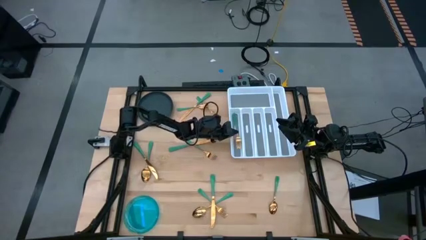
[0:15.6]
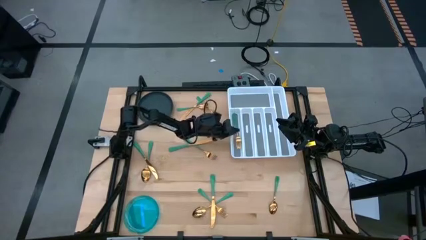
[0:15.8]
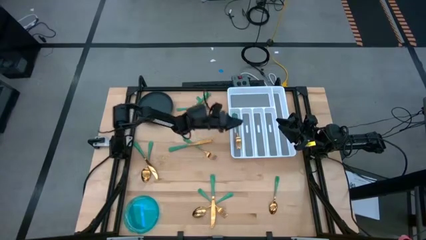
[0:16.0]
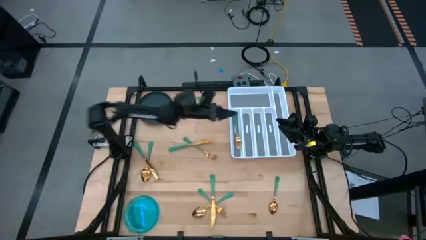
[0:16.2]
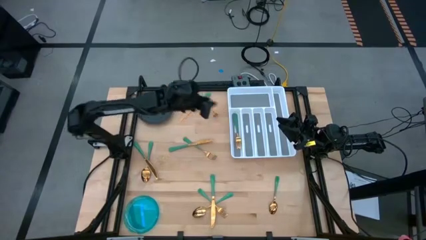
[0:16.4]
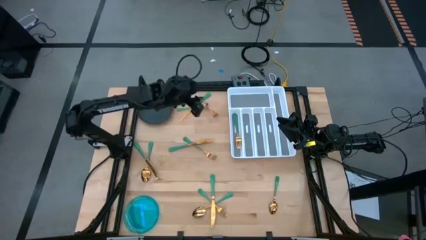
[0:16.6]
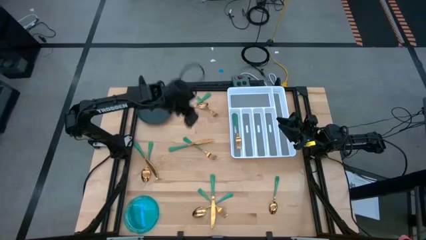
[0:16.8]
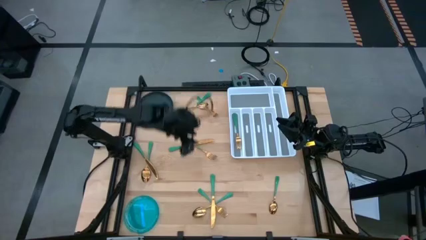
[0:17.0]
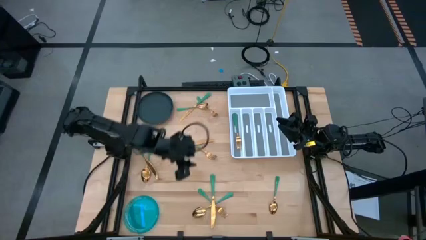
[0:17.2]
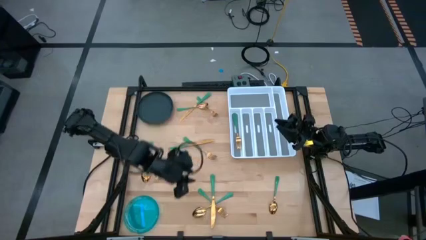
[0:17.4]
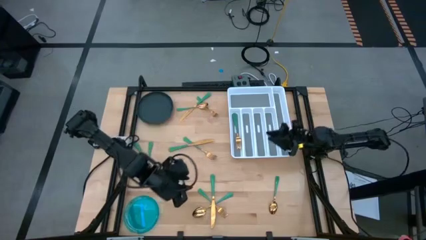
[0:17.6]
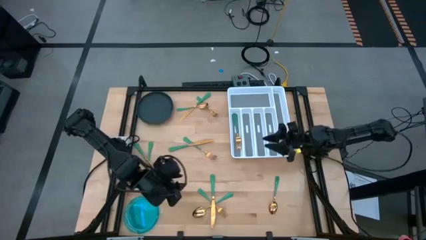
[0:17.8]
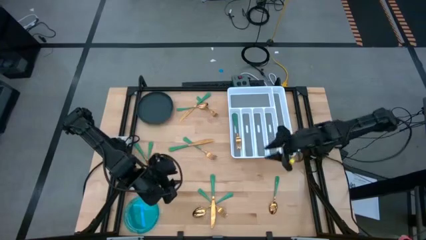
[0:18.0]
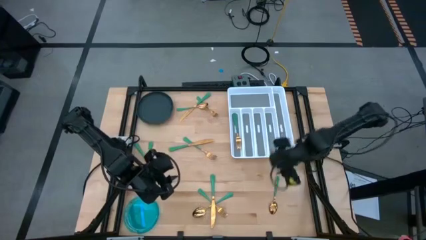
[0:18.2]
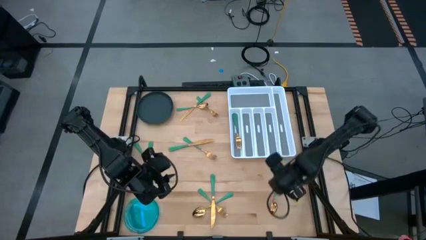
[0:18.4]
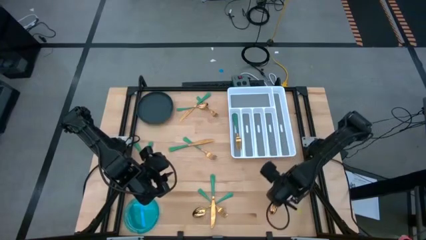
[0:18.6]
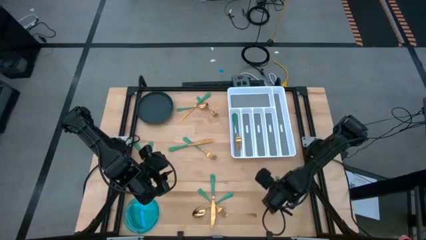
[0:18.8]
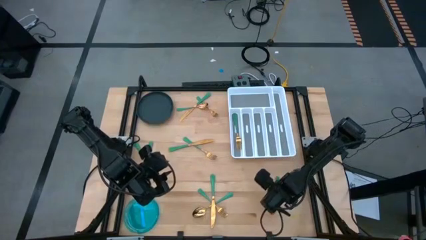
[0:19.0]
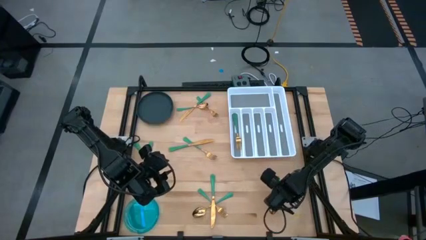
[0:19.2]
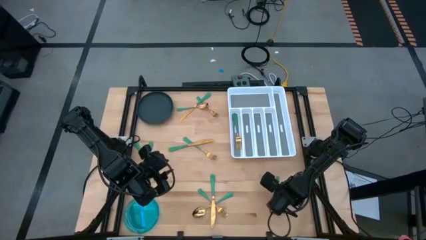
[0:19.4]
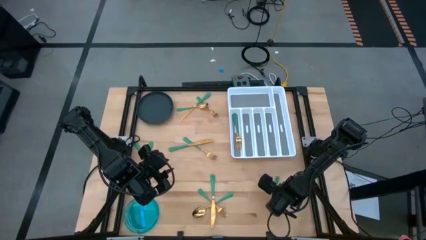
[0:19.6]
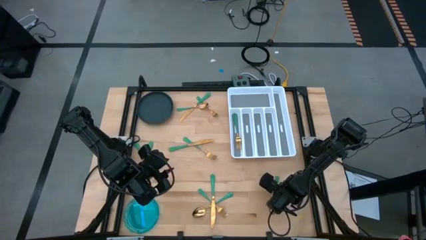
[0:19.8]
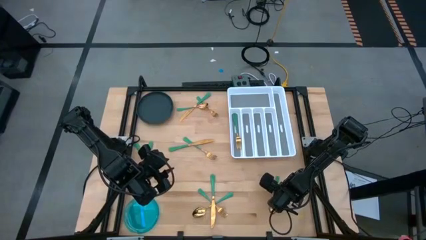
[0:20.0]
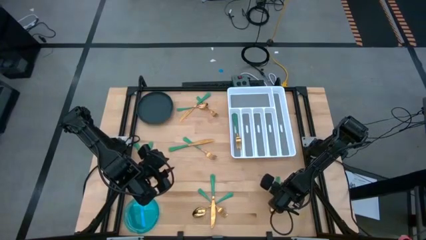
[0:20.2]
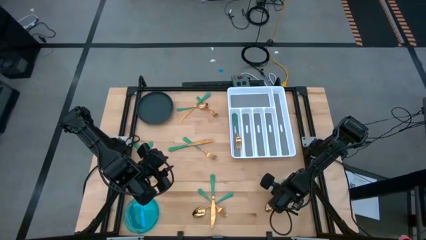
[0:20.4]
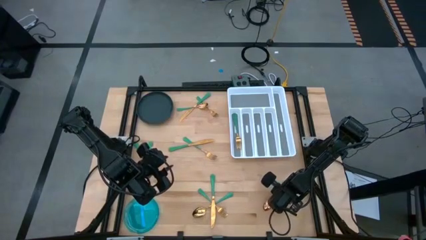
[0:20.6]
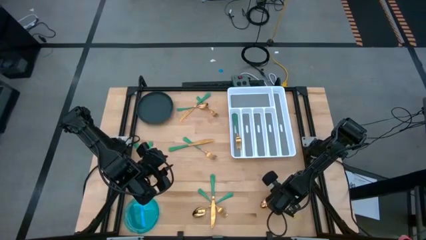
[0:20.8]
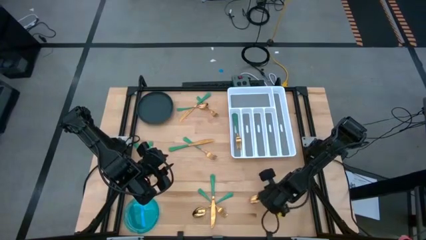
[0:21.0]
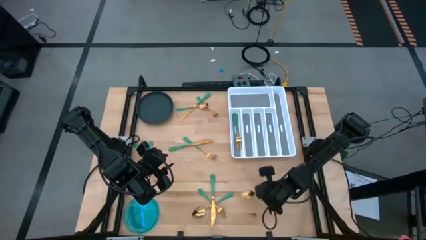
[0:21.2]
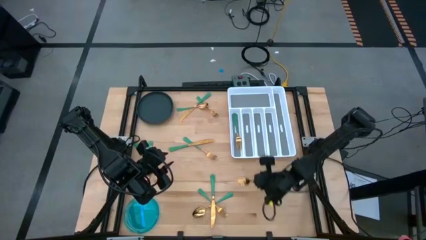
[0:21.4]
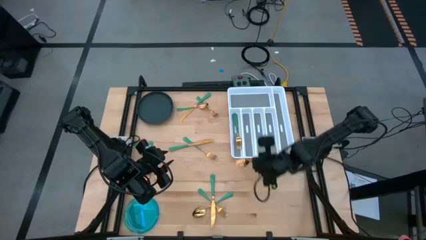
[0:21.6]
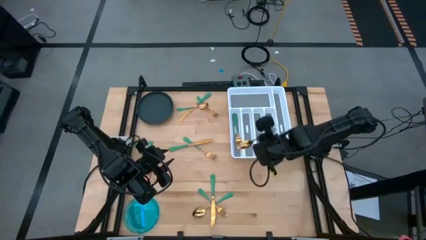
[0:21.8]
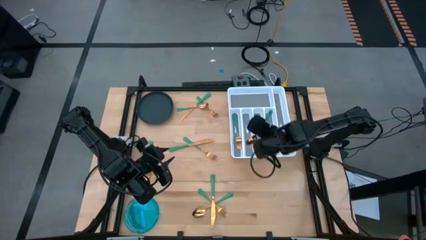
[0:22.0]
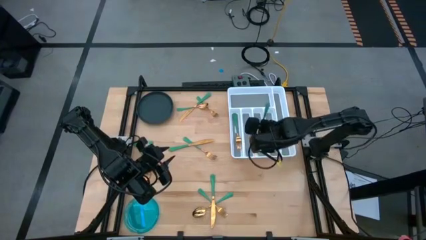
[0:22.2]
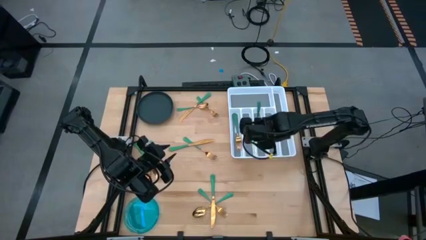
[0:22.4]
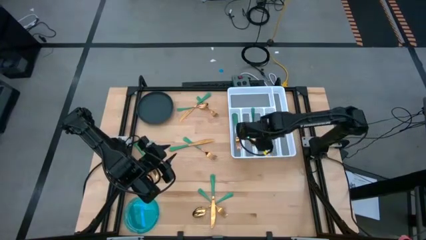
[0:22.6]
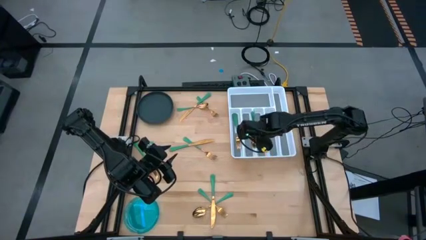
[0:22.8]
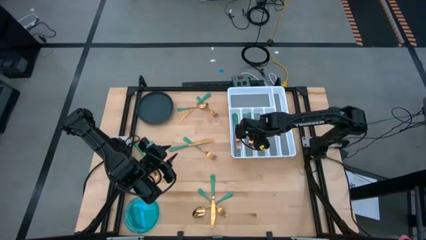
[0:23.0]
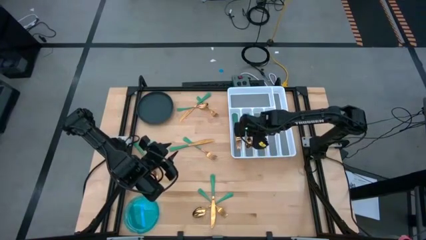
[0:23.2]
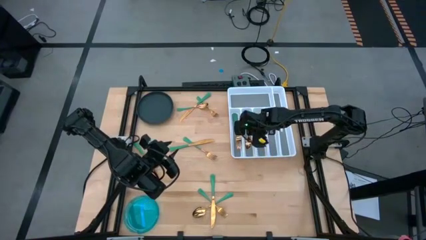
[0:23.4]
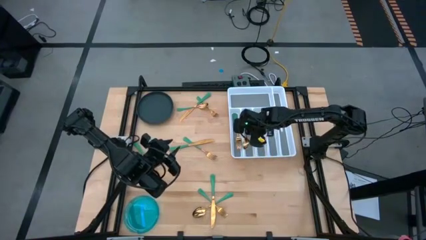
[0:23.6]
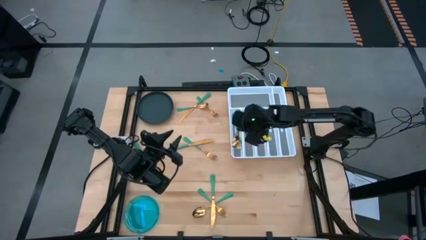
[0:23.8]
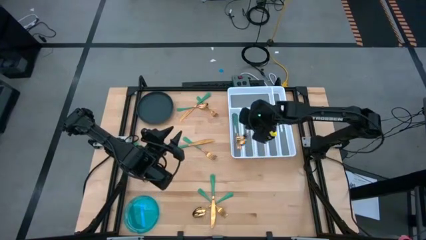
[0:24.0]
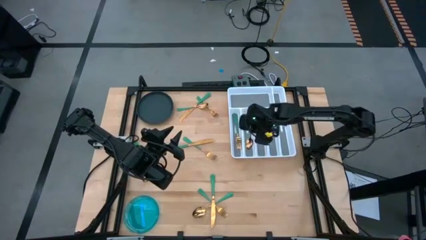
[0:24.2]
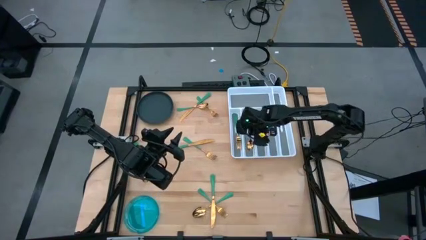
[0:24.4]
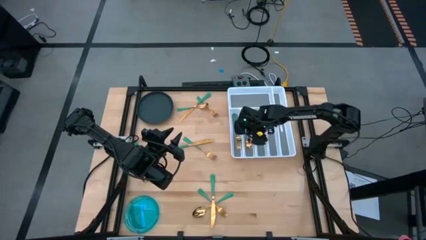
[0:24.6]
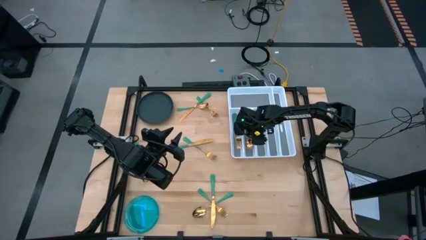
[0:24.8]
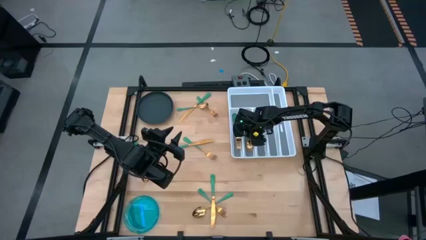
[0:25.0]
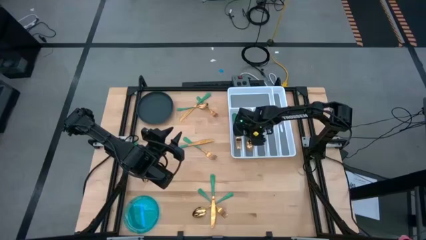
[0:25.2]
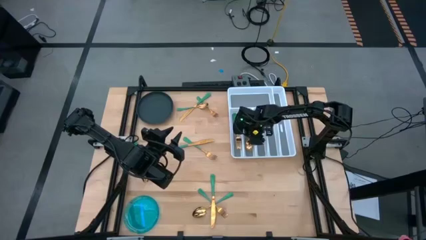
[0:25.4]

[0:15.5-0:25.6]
Task: Sort silverware
Put the green spoon into the white silverware organizer

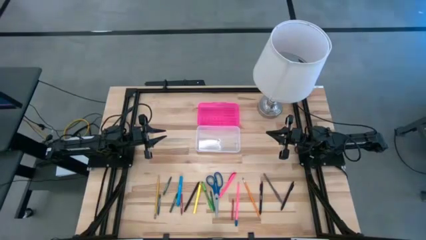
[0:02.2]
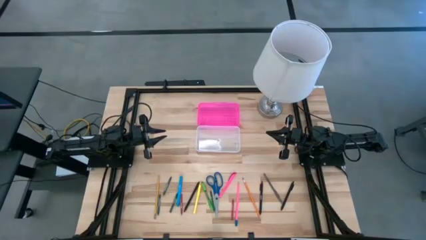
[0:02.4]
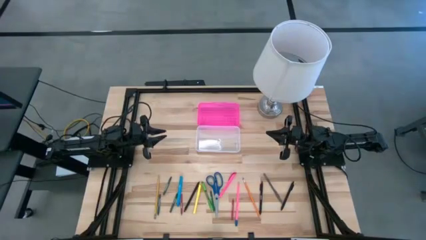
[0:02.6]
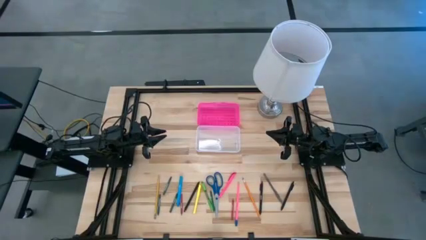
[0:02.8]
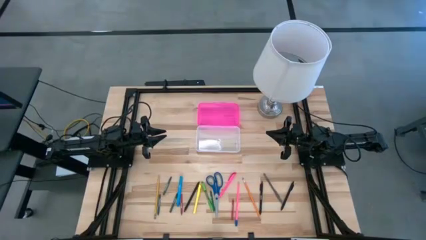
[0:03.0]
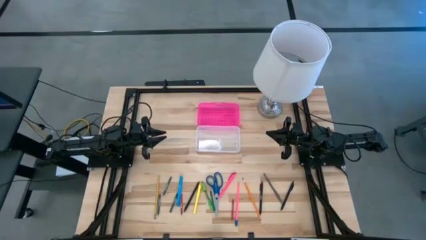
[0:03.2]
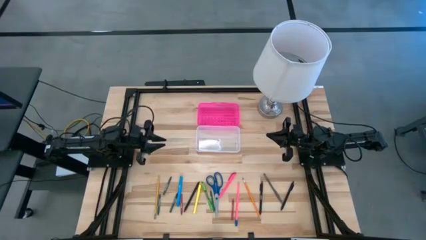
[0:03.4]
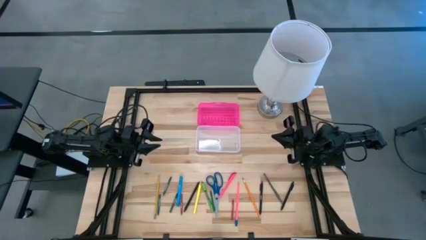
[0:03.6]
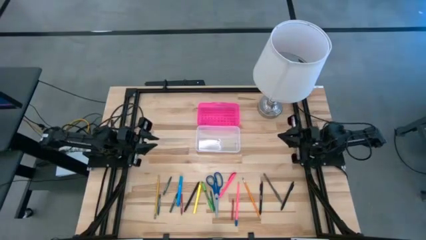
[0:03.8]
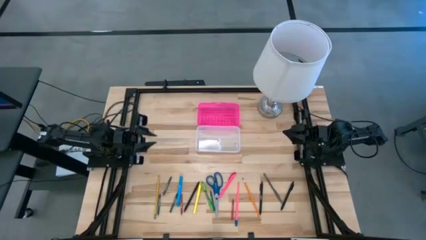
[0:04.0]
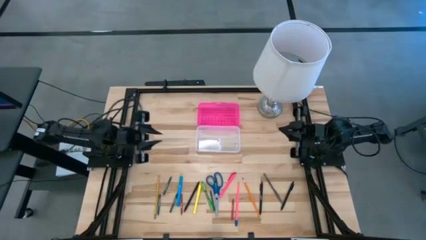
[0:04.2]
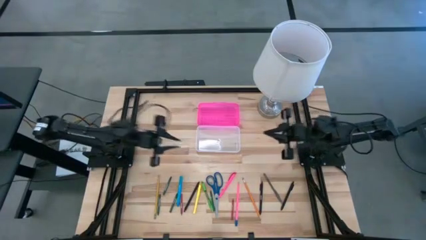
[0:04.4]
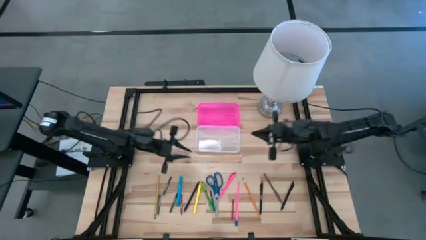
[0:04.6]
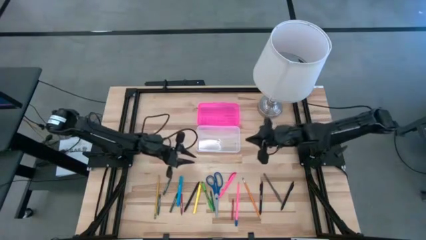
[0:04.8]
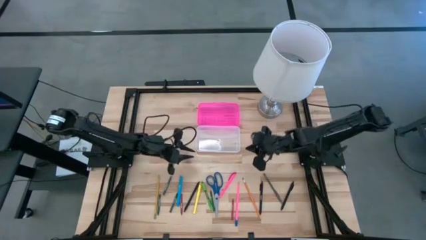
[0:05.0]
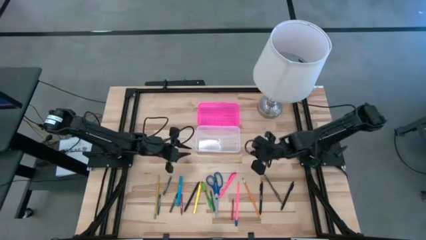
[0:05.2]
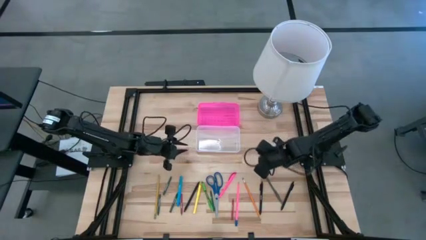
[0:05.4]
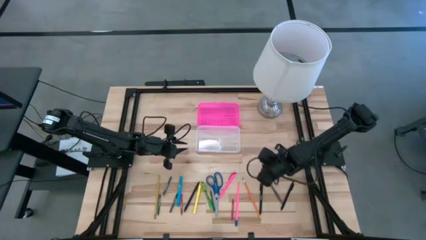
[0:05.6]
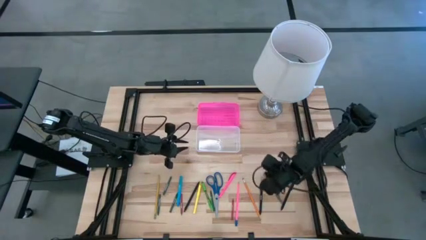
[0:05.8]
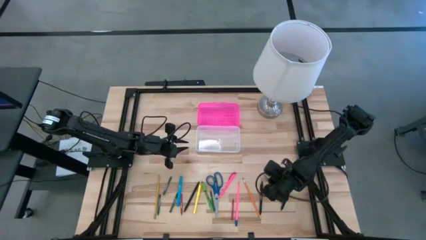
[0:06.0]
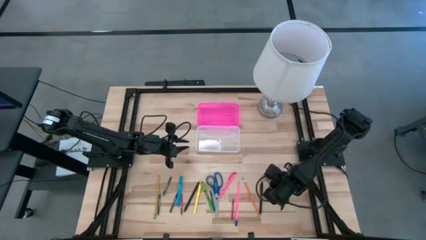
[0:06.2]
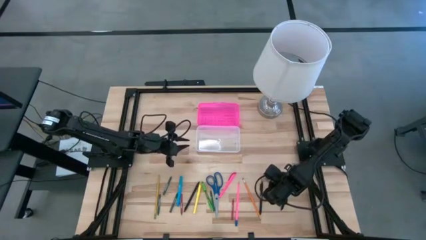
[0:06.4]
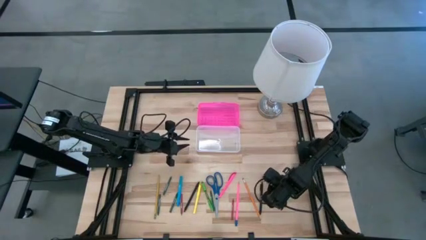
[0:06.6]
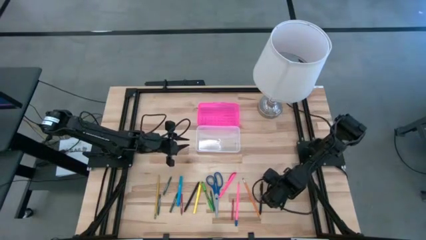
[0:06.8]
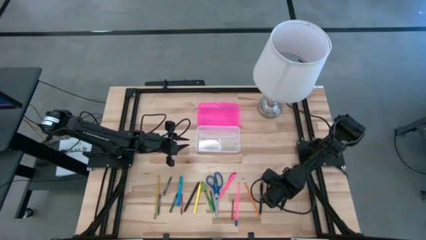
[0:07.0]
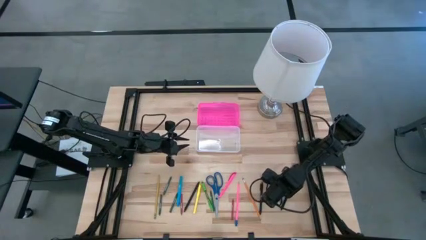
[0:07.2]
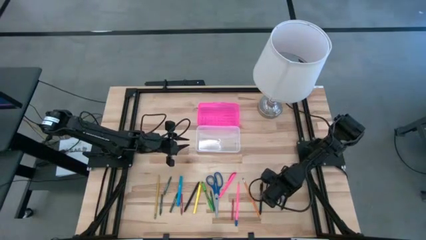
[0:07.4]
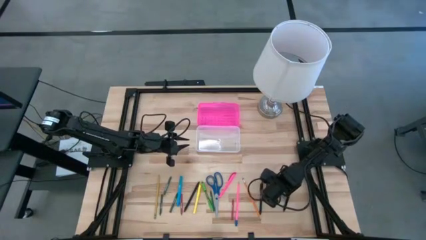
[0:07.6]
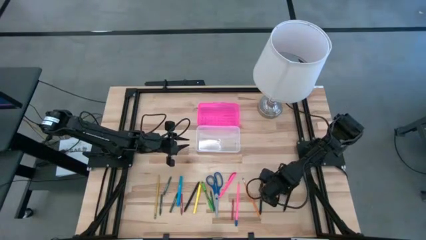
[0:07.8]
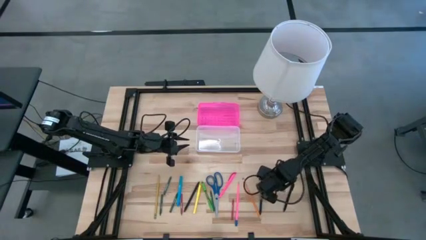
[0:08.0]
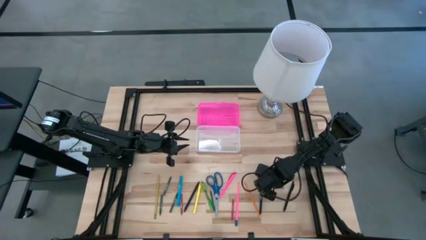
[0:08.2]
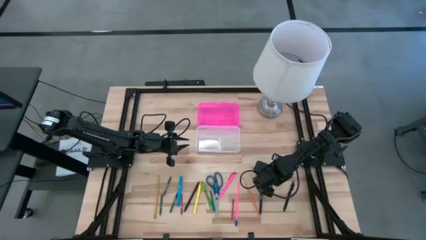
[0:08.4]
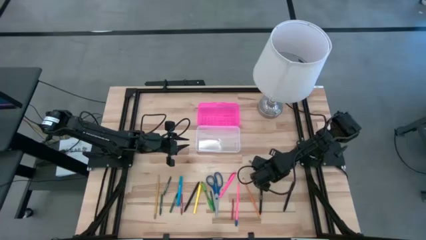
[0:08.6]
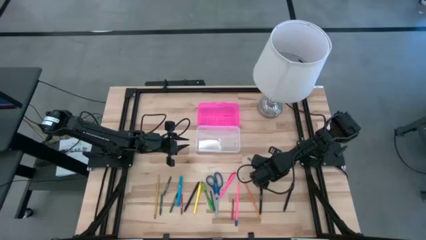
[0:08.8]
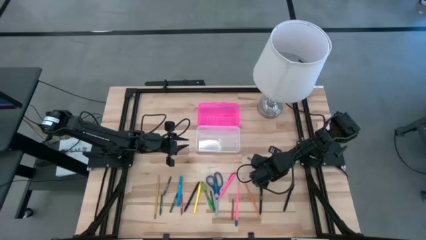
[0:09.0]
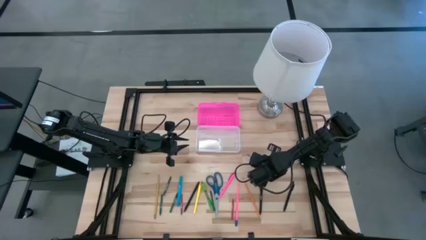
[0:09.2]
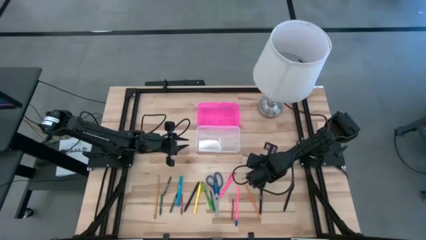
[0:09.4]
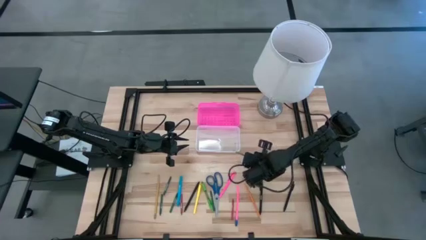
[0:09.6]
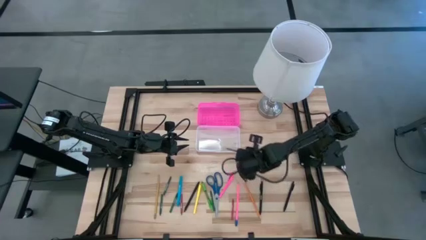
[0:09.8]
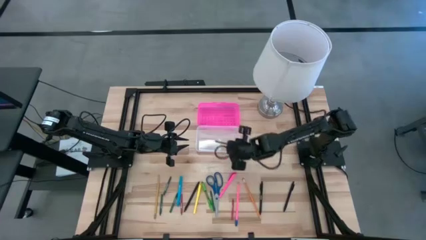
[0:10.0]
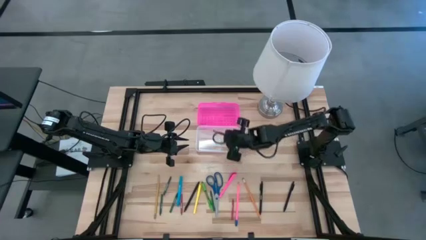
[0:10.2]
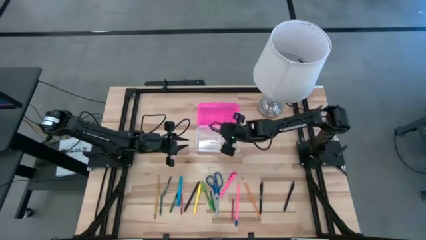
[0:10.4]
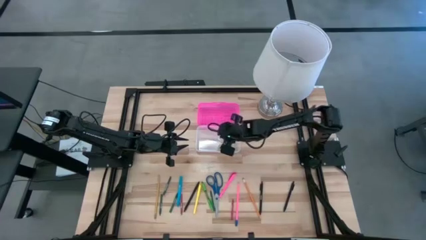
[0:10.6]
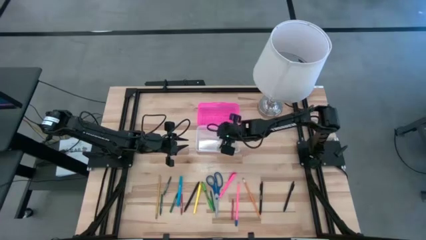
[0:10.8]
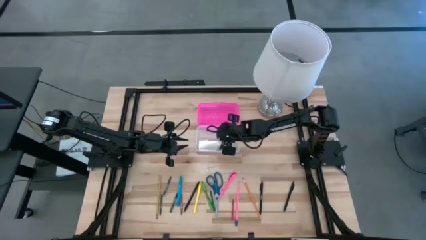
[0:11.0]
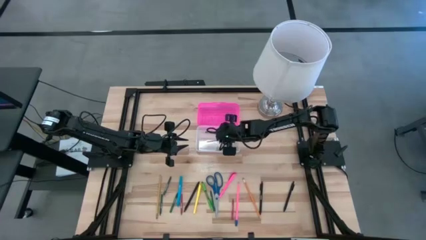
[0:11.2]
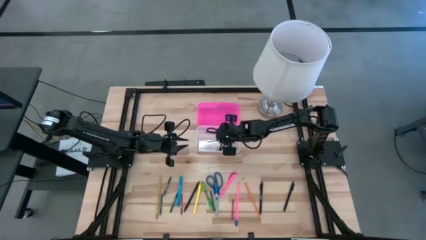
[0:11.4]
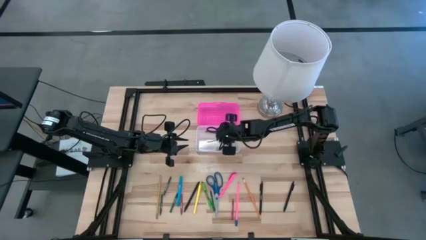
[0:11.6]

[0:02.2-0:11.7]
Task: Pick & place school supplies into a supply box
Put the gray pen into the supply box
